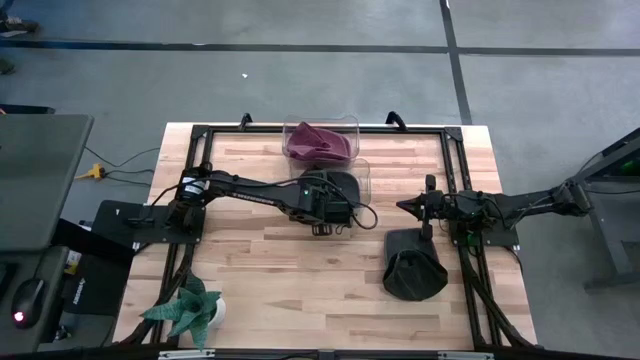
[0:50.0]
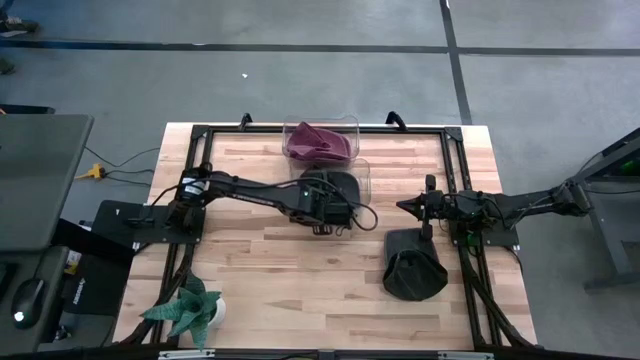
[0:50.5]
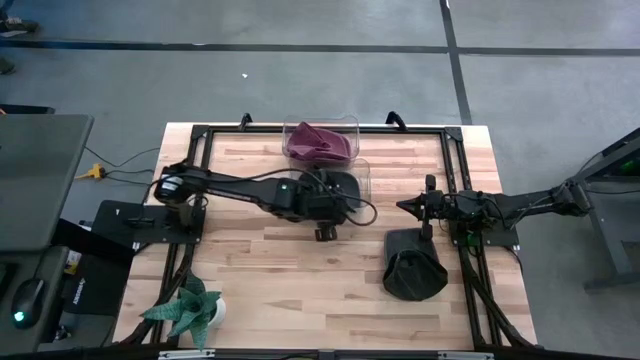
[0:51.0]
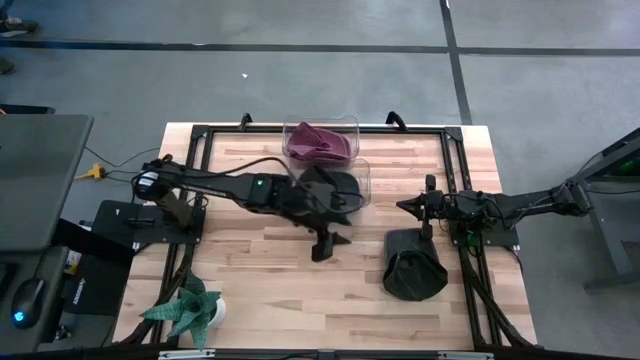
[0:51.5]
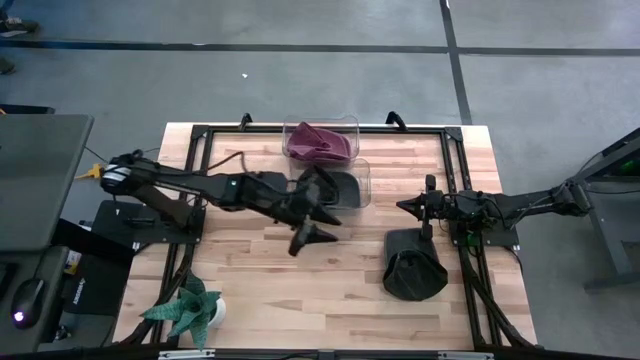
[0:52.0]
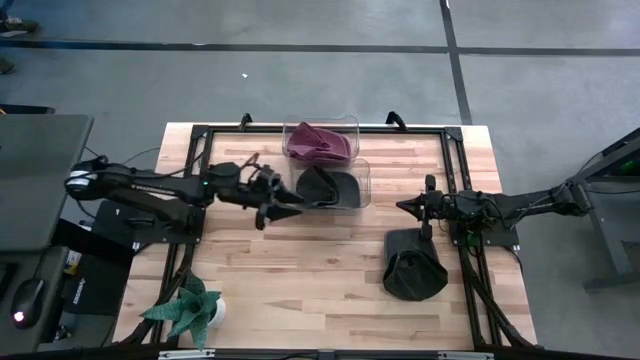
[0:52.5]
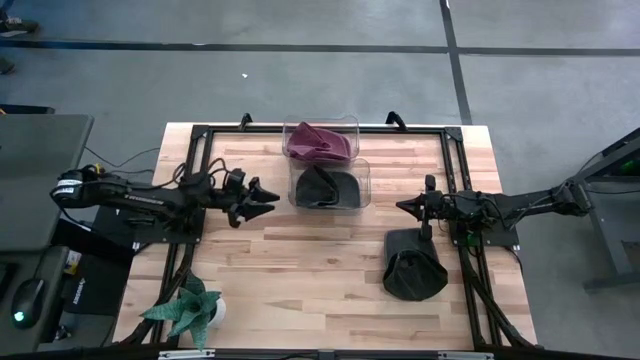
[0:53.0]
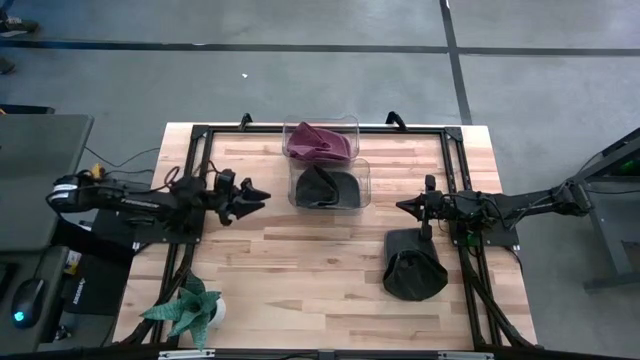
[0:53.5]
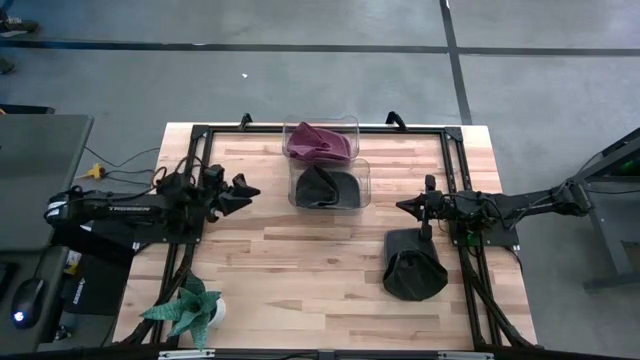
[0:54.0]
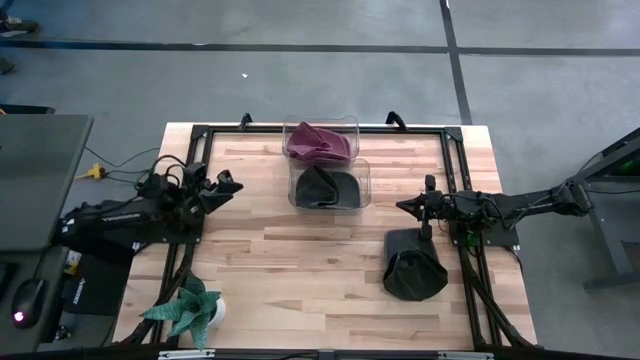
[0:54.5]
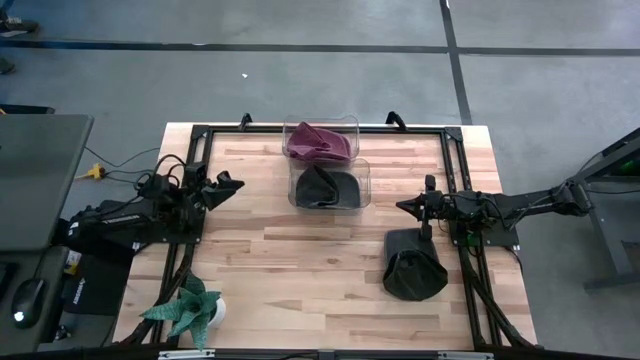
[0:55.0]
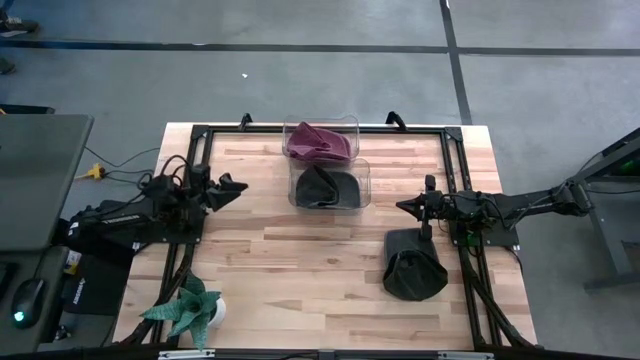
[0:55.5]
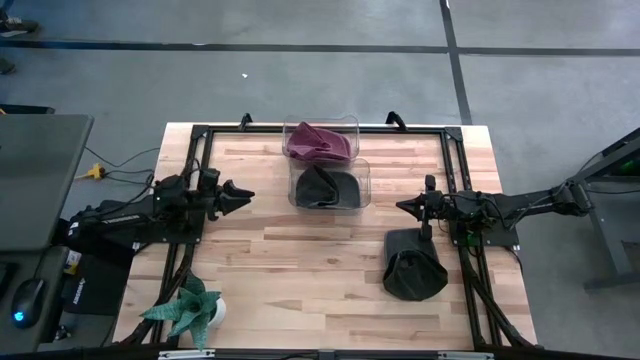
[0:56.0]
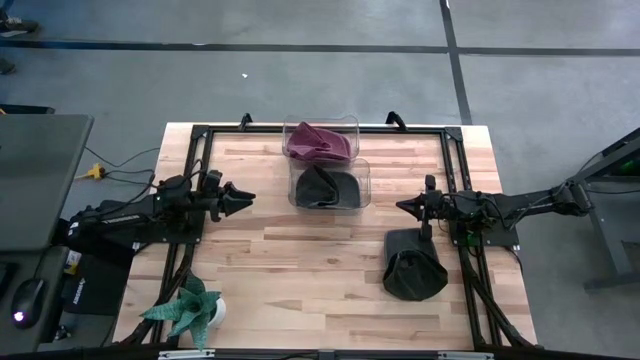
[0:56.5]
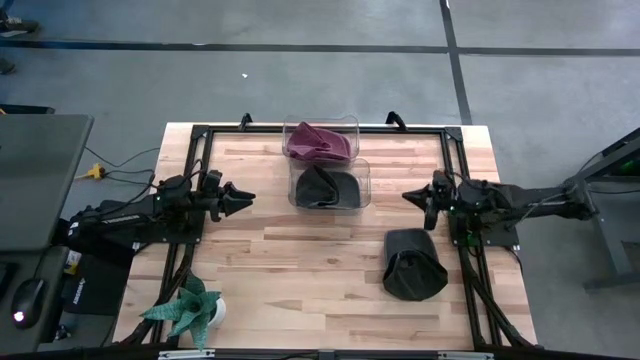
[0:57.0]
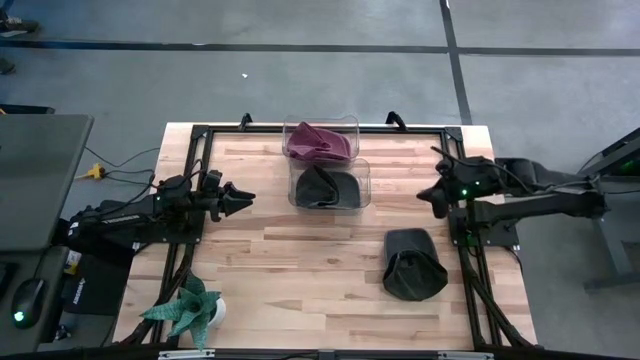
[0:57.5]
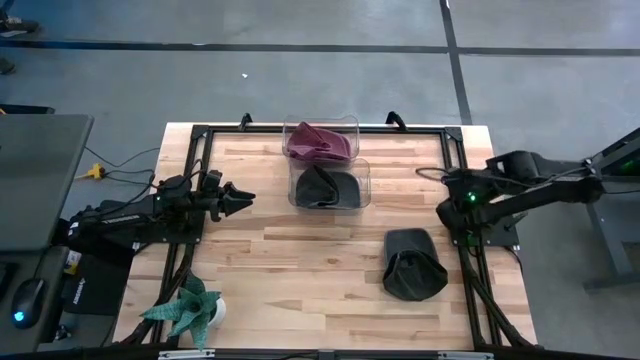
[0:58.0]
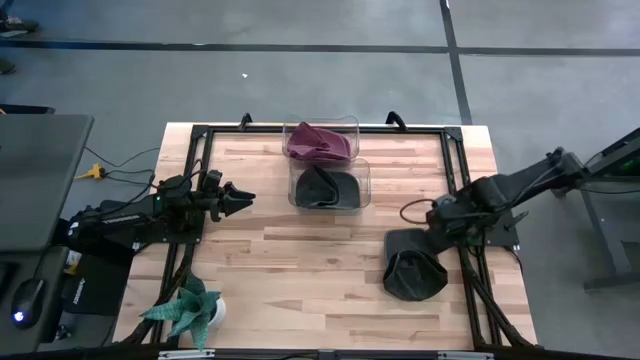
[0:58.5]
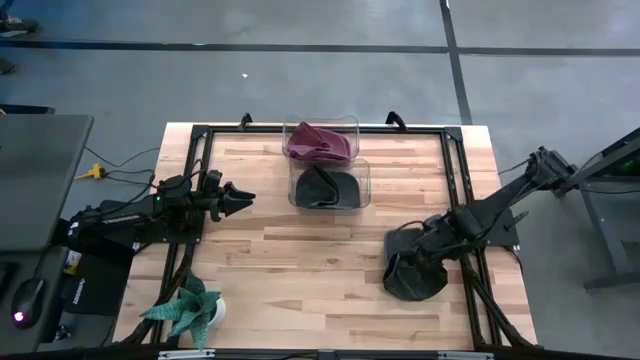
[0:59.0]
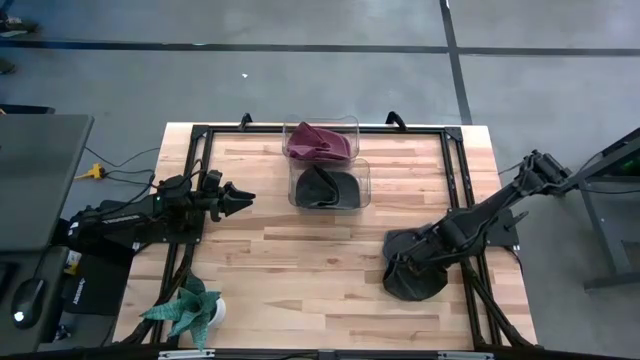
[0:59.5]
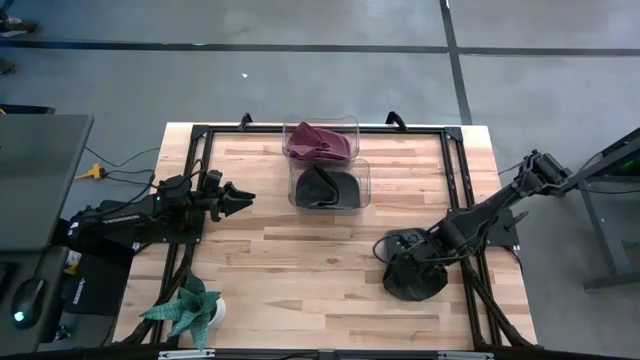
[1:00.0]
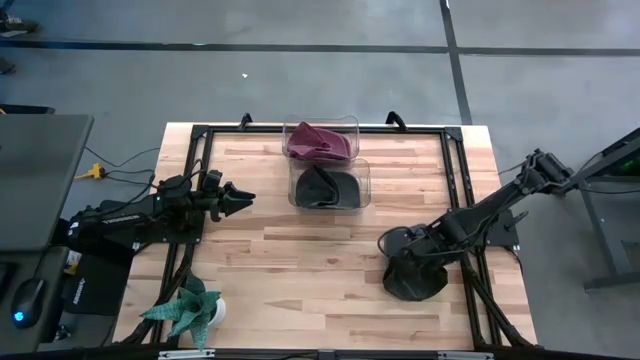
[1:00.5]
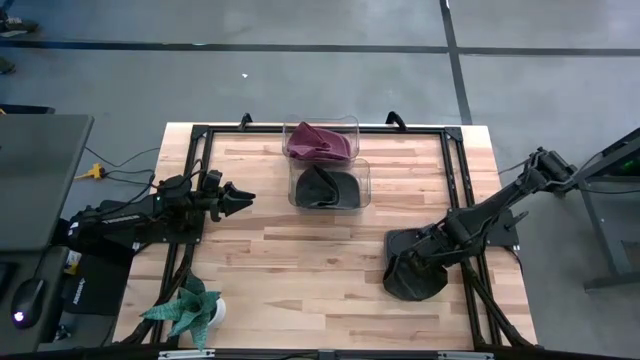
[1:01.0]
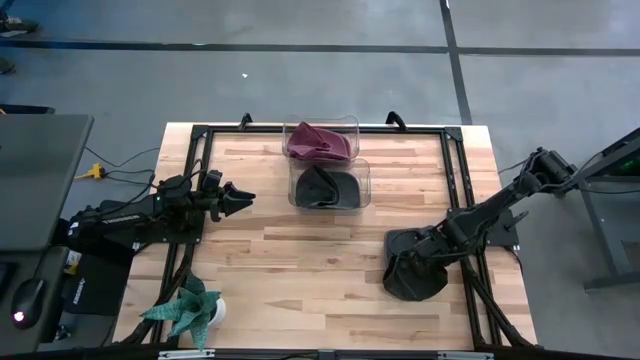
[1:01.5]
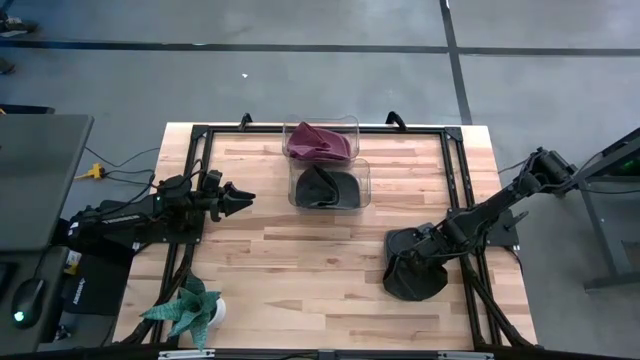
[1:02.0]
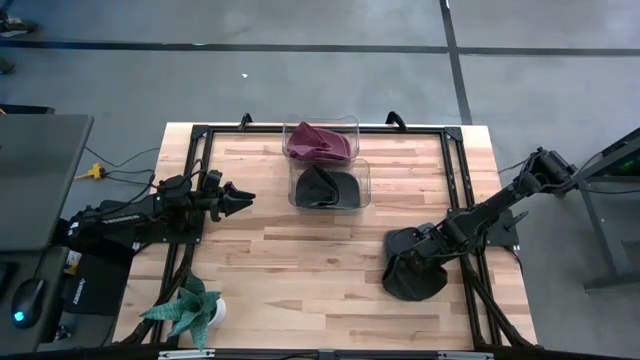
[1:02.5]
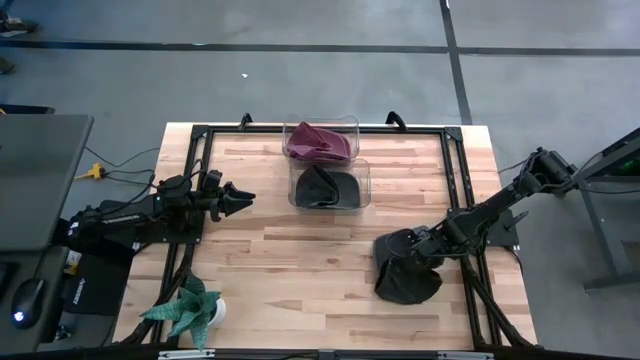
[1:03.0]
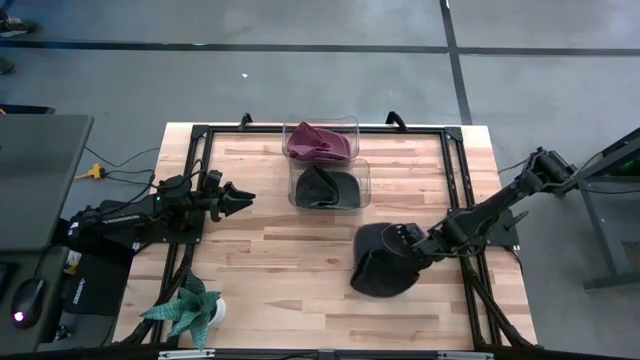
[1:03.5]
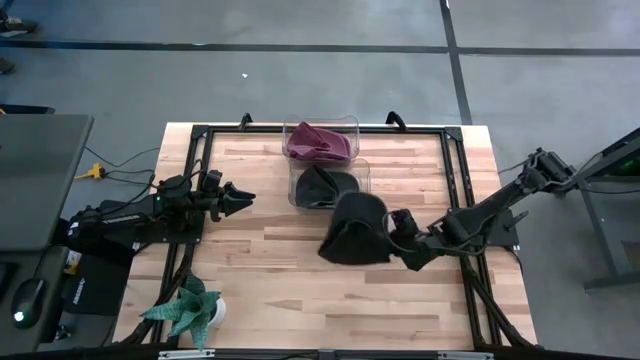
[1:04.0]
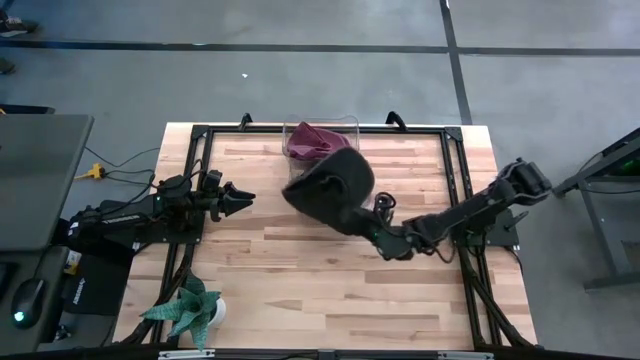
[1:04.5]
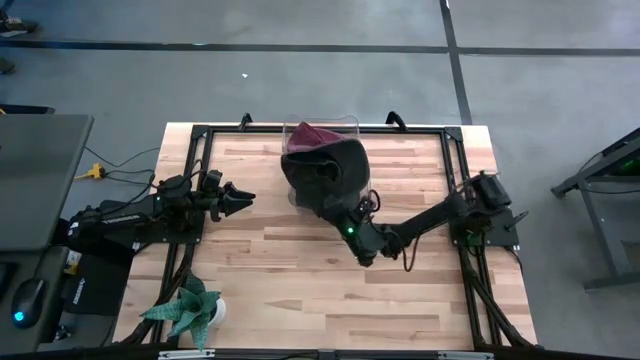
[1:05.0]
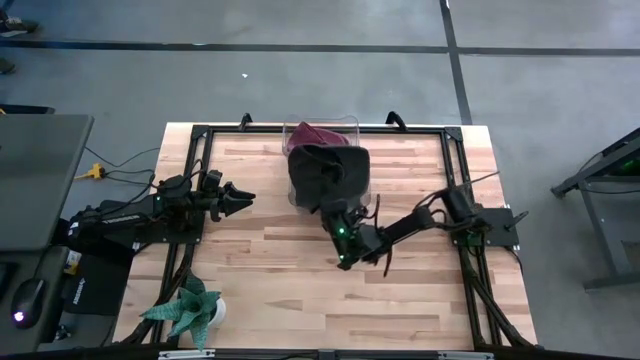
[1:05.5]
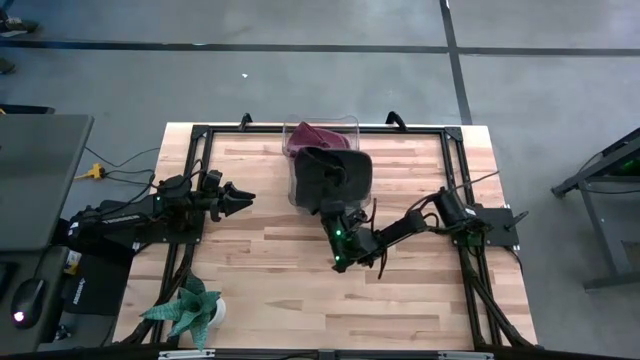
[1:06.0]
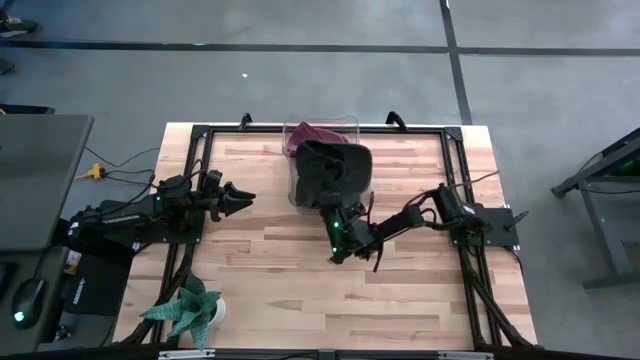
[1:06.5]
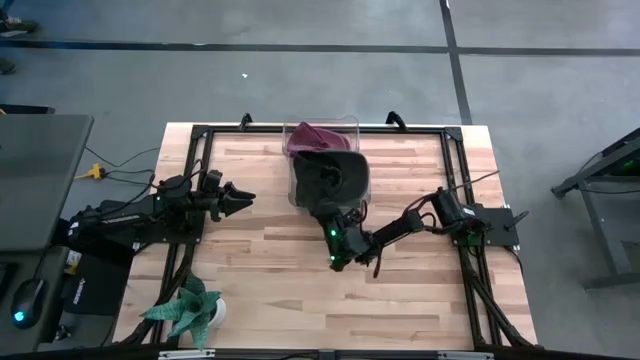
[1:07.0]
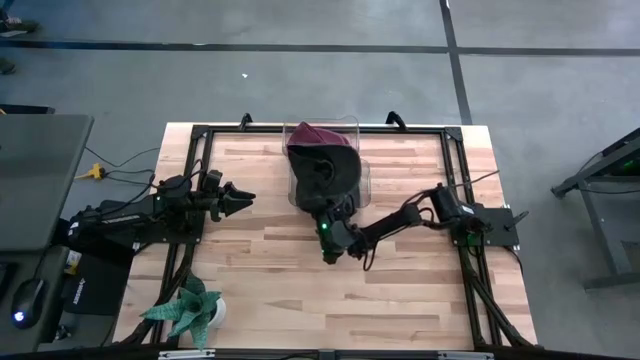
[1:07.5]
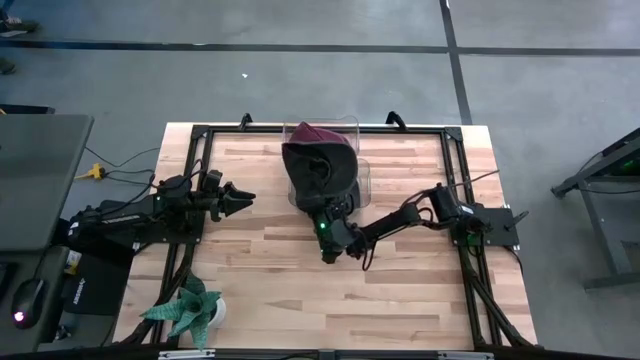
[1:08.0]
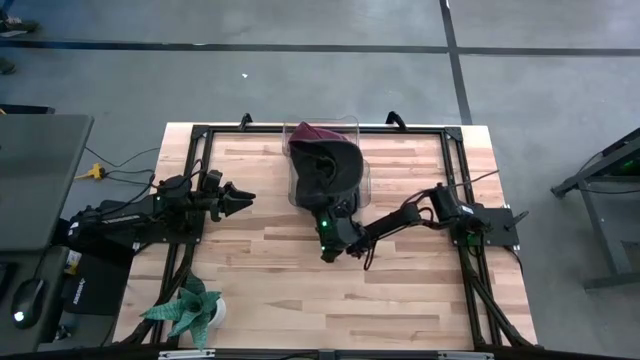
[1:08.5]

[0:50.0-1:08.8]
Task: Pick & Place hat
Put the black cap into the bottom transparent bin

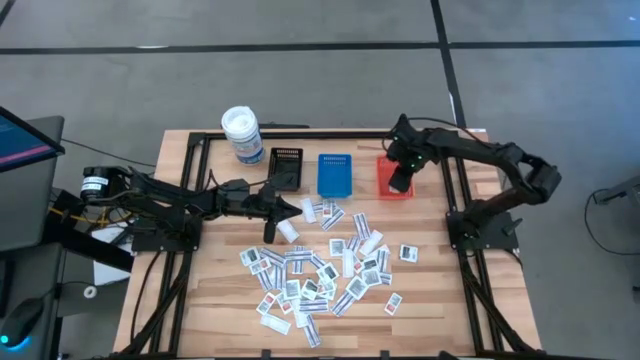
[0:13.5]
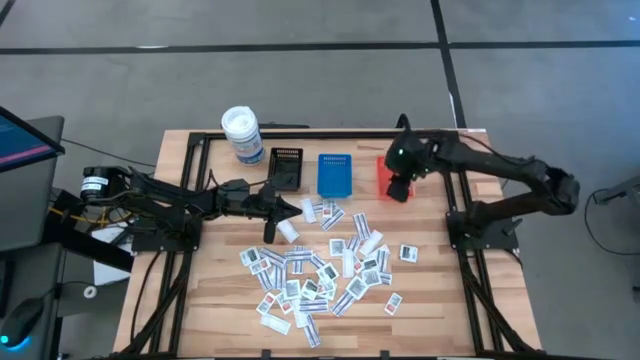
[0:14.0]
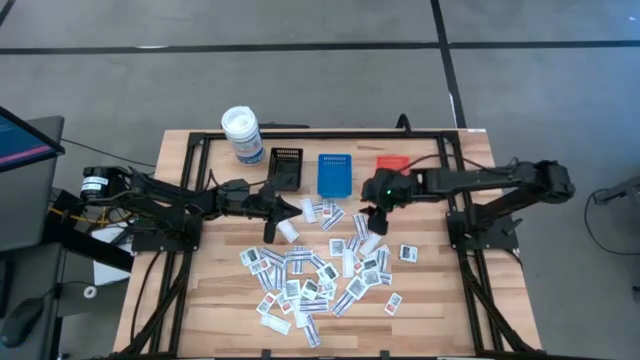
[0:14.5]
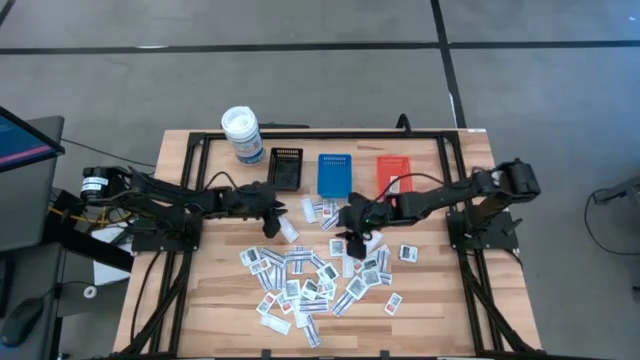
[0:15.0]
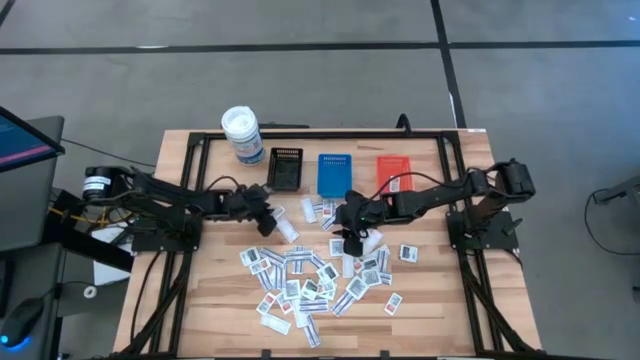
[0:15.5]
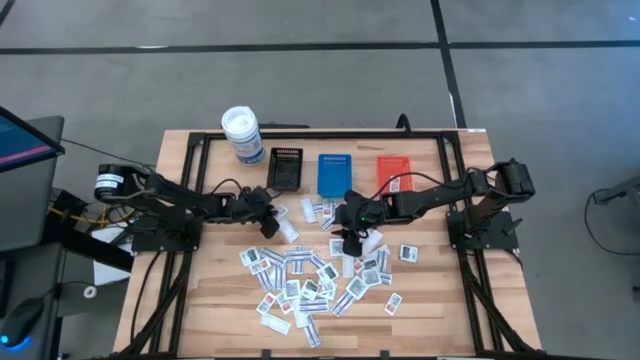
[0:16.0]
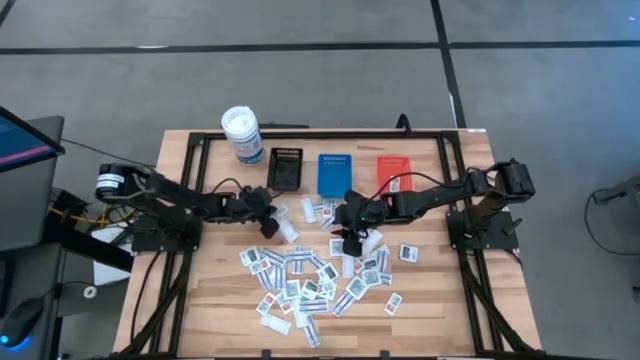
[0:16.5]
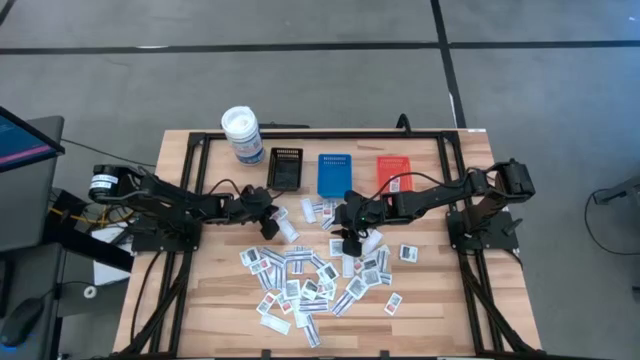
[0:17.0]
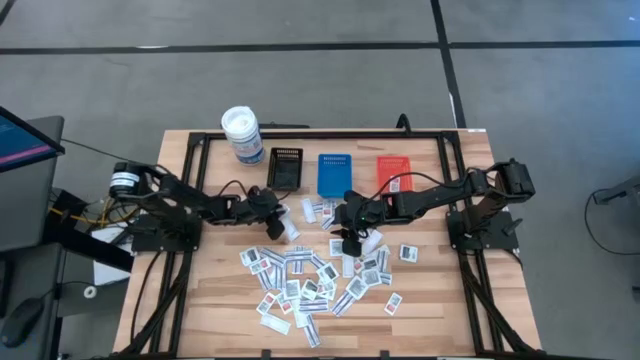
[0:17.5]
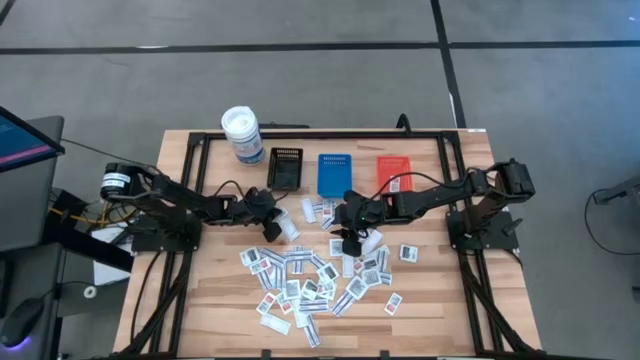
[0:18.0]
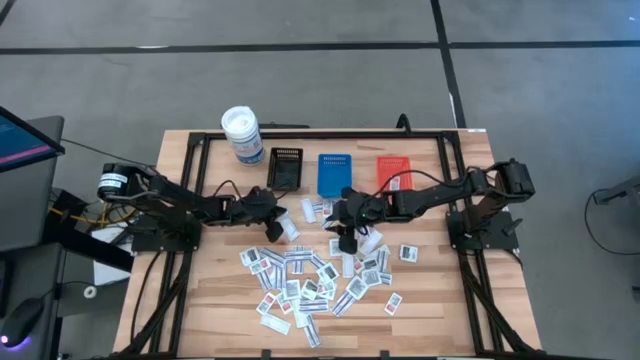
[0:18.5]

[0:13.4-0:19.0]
Task: Pick & Place First Aid Supplies
Put the orange ointment pack into the orange bin
